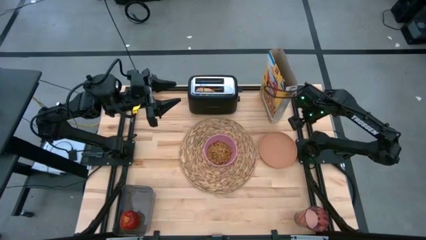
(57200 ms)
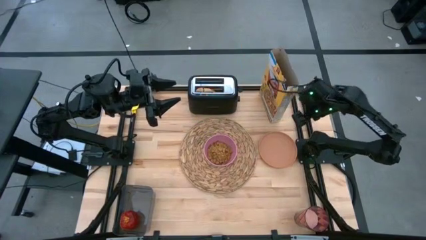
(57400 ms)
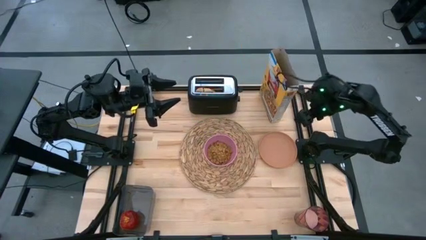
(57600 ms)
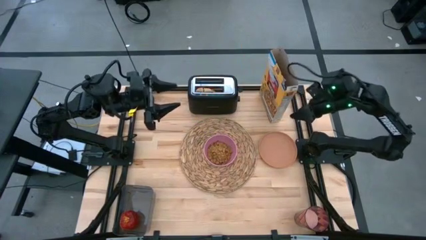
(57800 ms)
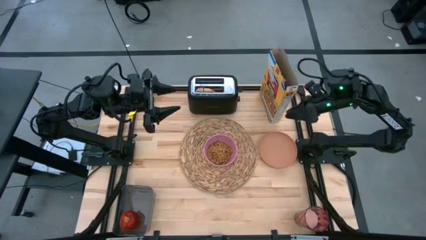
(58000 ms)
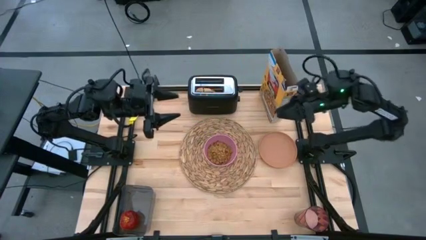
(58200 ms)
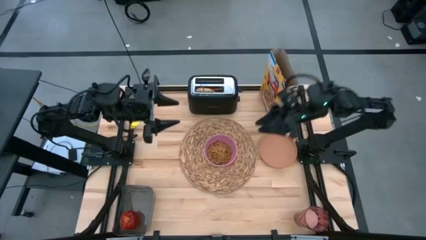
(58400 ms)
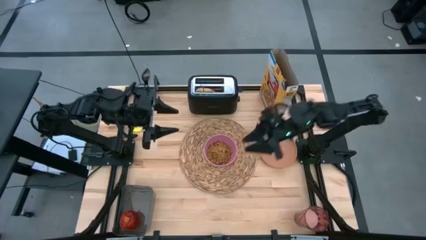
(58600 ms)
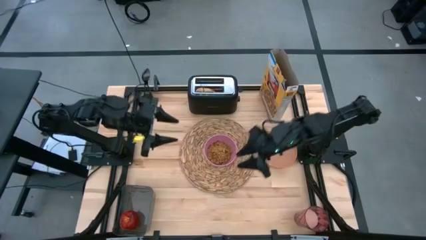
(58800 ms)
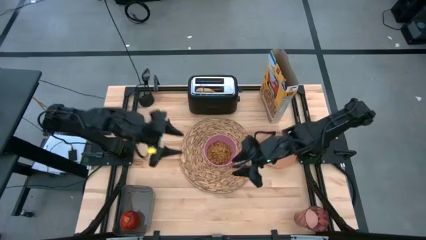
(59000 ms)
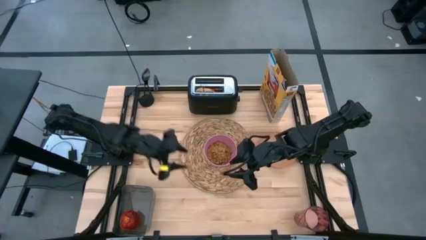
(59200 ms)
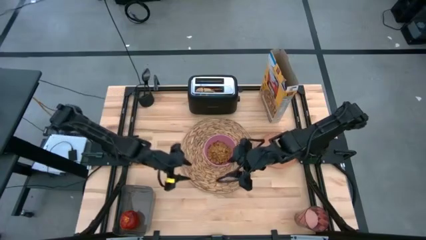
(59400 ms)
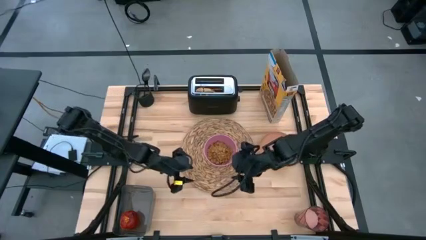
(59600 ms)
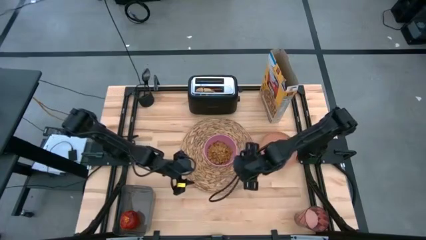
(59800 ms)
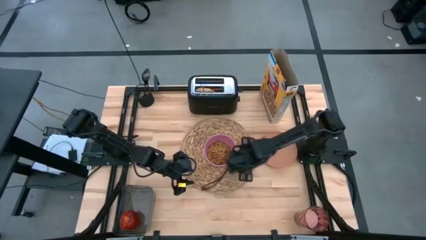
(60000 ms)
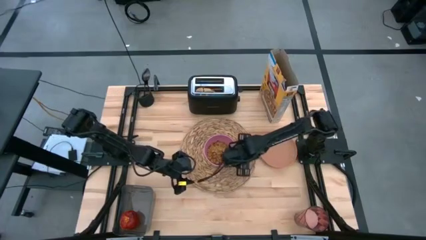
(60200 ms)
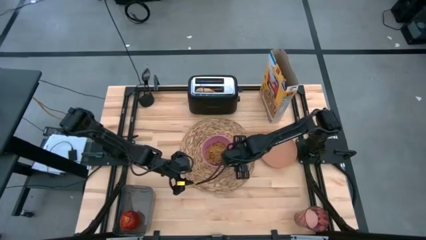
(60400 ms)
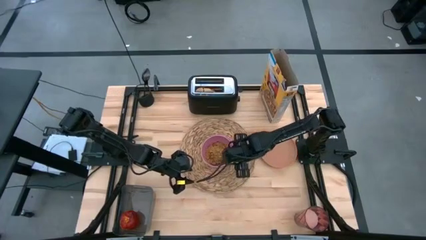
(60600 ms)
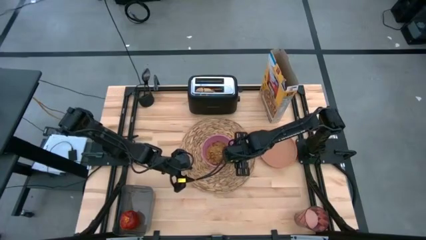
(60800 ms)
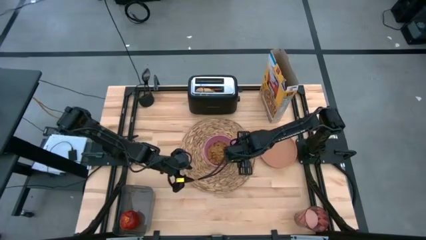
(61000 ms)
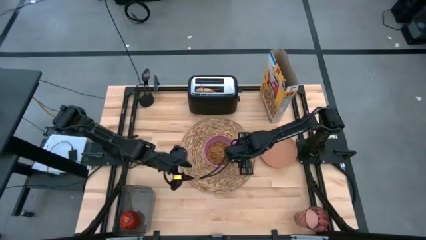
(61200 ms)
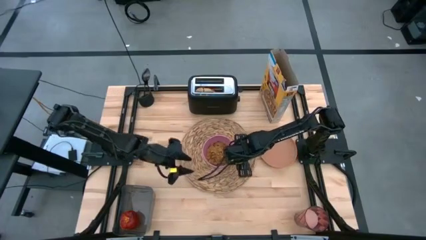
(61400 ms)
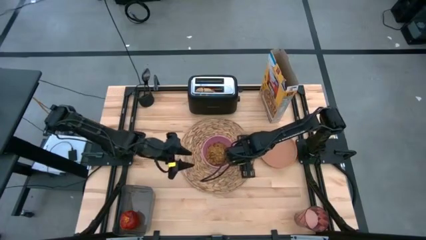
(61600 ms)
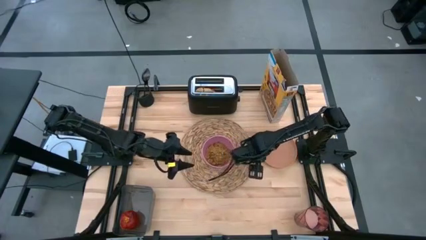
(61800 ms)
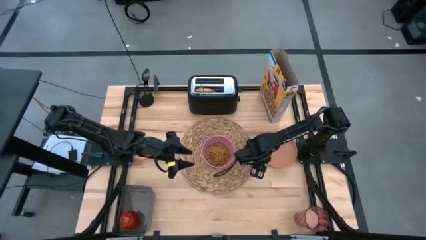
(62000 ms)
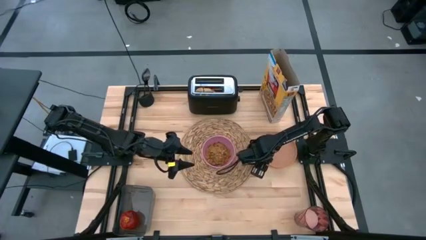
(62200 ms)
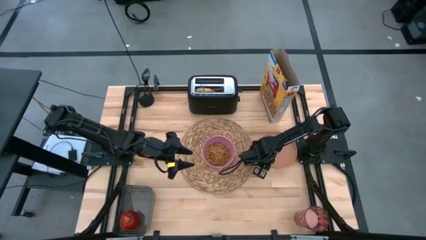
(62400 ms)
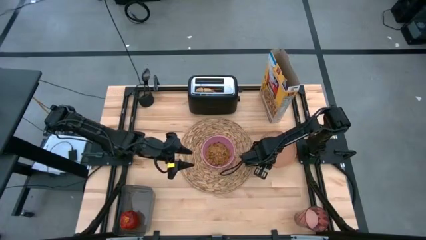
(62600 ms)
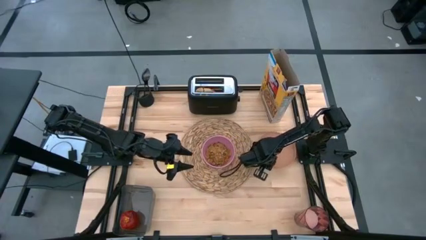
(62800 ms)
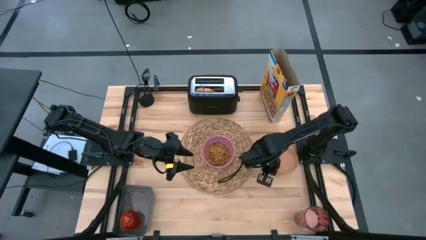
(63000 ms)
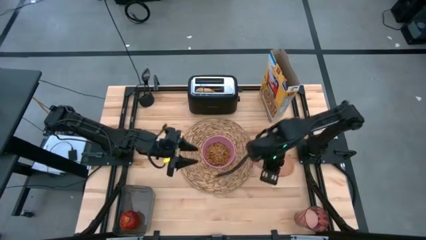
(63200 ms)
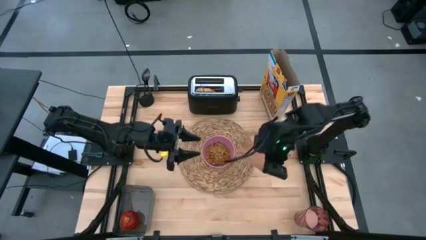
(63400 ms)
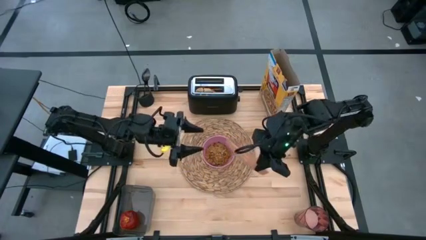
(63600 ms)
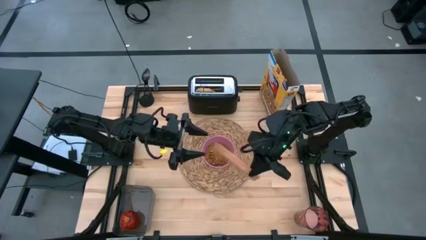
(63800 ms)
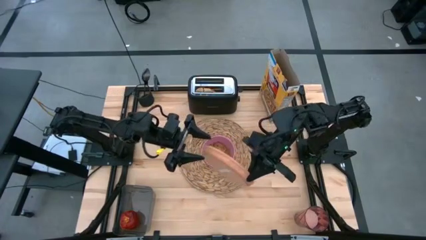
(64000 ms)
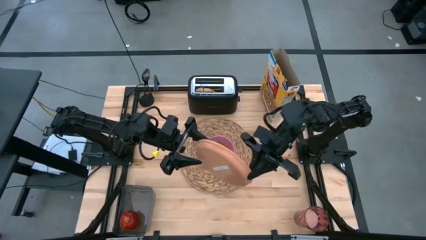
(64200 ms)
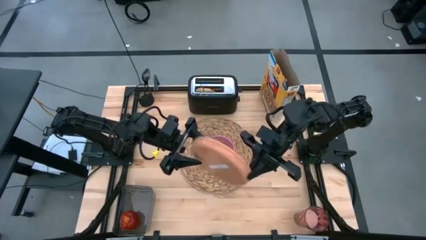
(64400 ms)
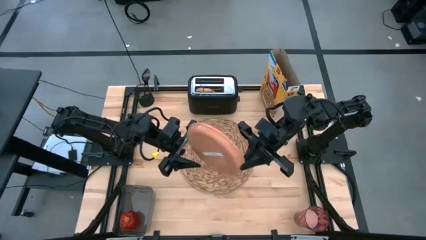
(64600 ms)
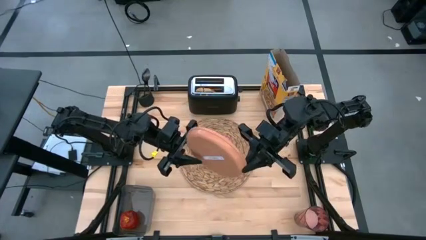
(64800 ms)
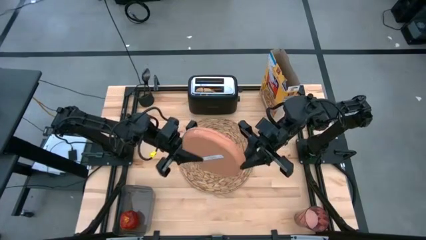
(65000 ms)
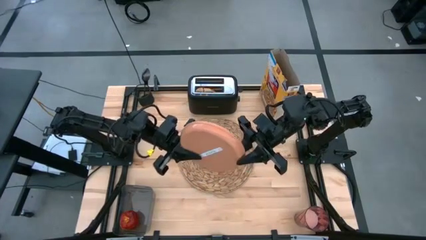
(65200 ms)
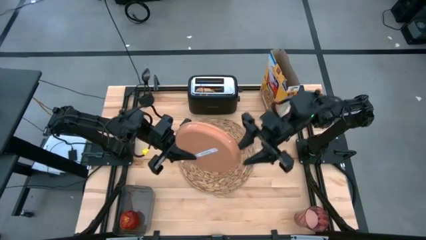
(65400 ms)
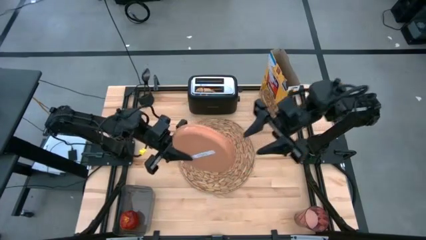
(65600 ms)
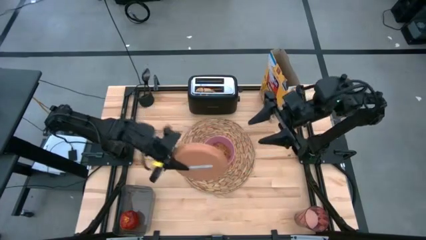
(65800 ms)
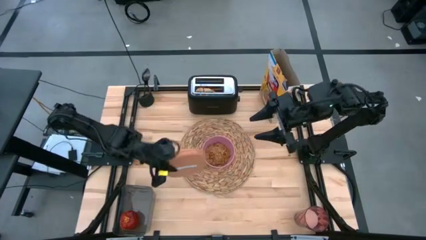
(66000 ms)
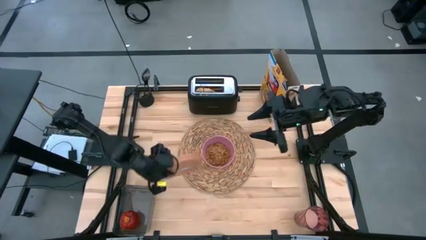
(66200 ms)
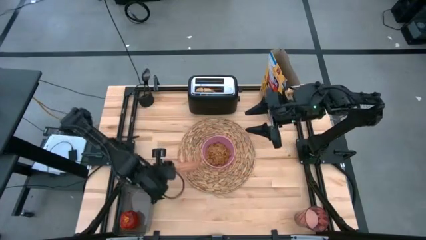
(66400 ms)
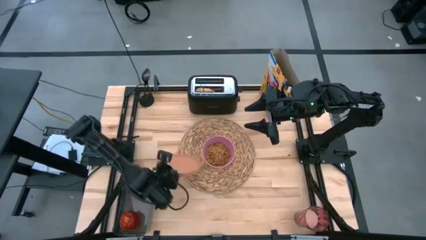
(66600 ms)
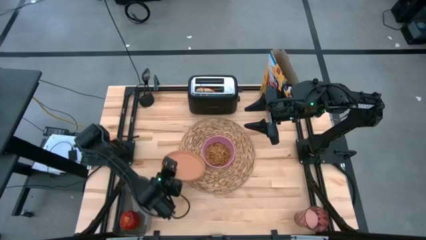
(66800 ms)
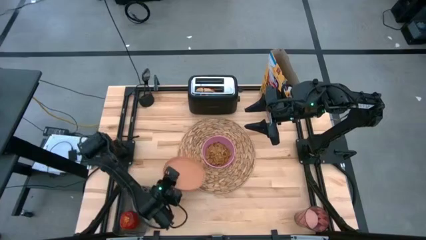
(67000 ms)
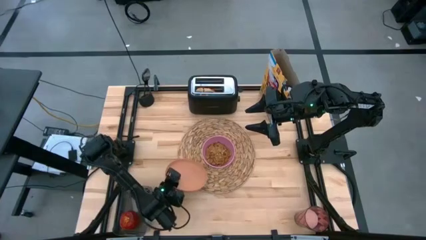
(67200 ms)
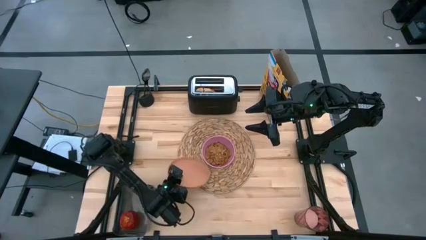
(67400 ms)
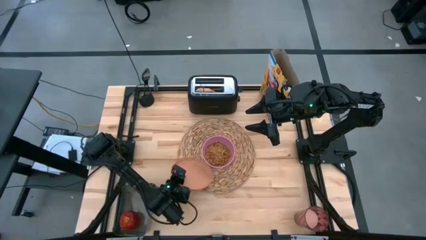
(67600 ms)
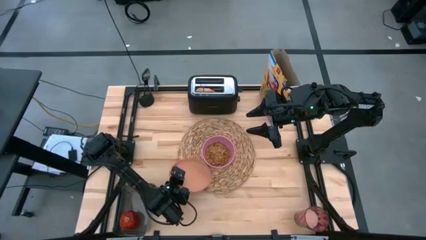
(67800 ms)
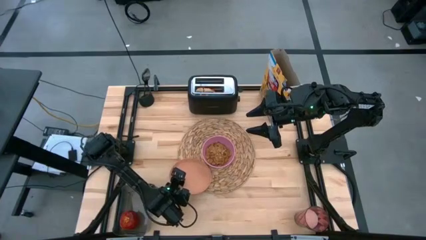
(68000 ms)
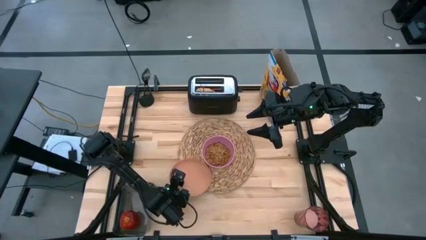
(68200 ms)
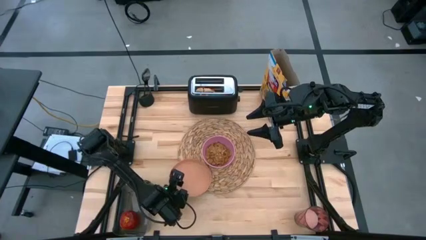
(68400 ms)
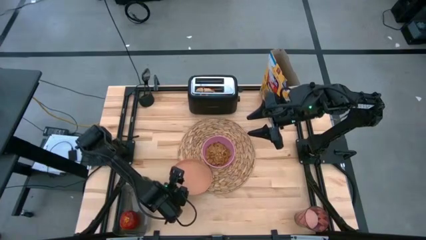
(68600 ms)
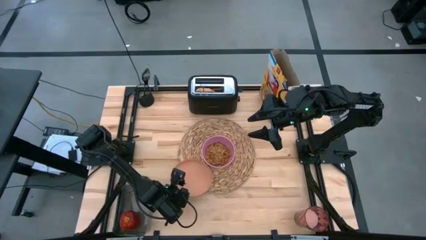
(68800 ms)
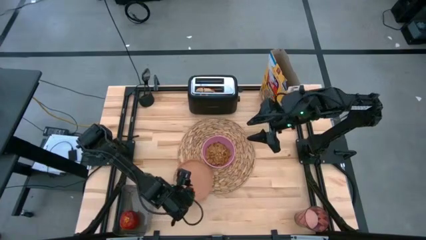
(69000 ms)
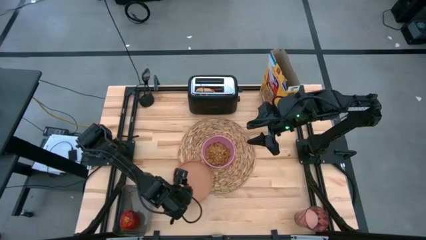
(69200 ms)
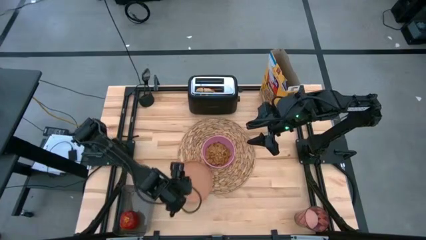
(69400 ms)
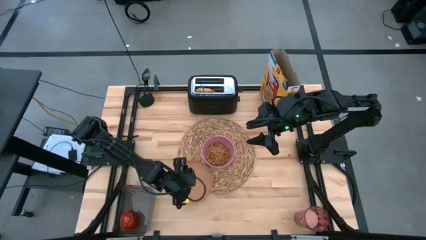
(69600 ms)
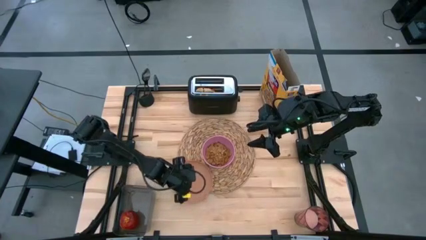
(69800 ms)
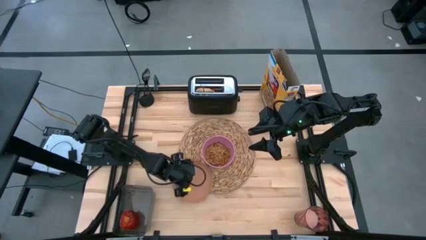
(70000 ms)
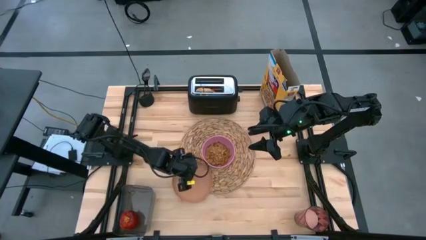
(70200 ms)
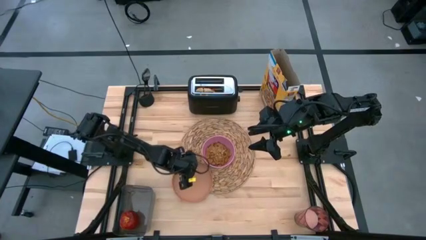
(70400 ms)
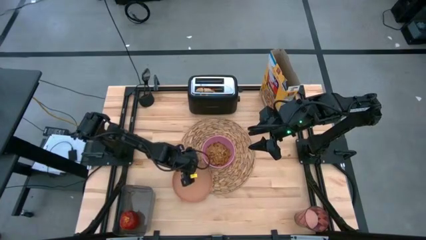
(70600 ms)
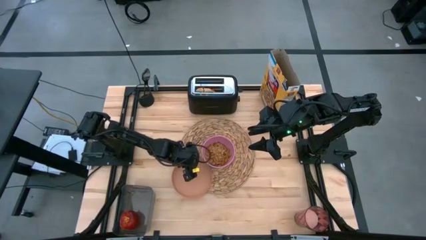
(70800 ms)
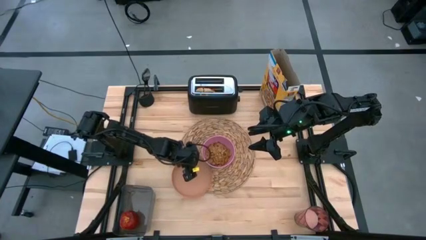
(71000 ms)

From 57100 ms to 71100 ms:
Task: Arrange a breakfast setting
Put the brown plate on the brown placemat

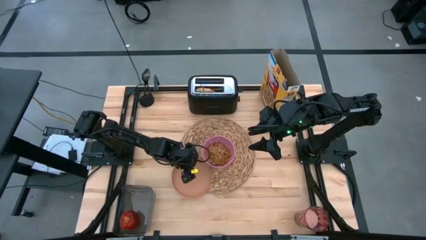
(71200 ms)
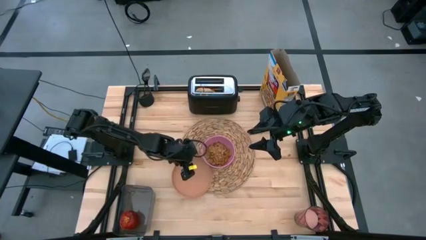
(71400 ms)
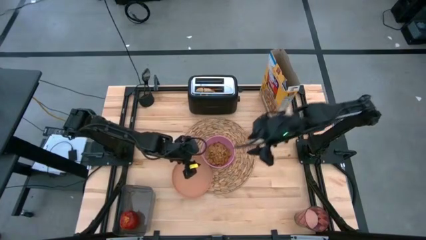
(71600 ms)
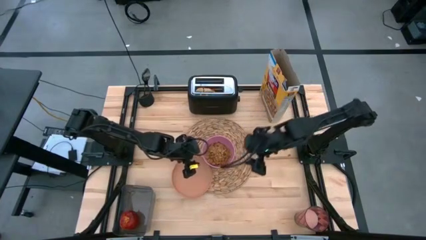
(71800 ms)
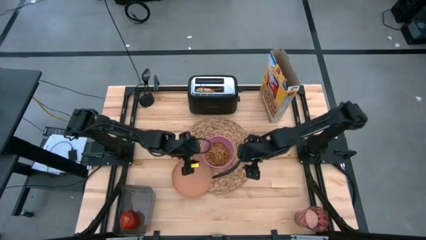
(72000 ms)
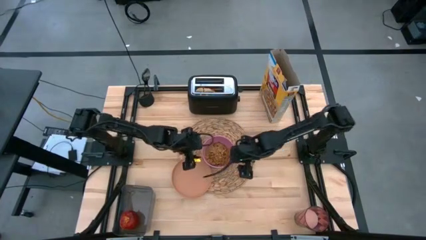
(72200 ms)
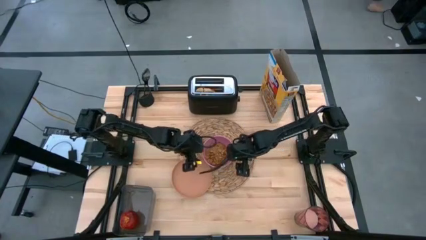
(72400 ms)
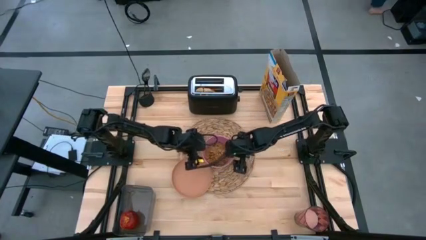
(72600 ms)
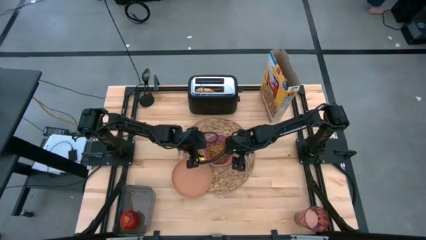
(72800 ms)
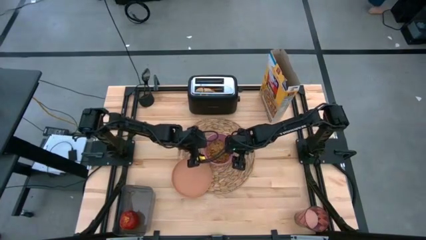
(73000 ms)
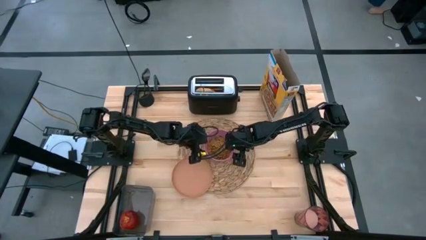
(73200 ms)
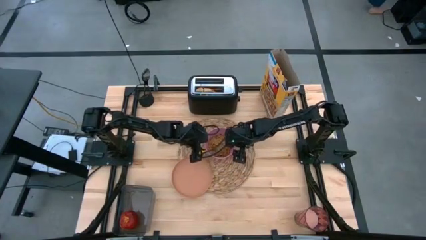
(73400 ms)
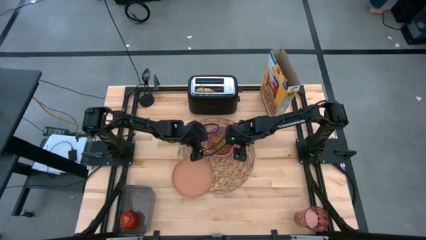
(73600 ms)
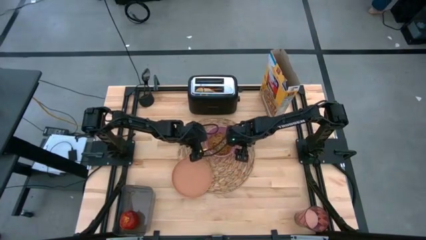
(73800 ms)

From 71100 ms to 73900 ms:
Adjust the pink bowl on the brown placemat

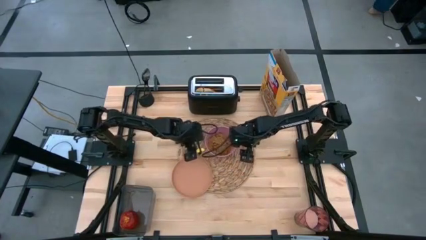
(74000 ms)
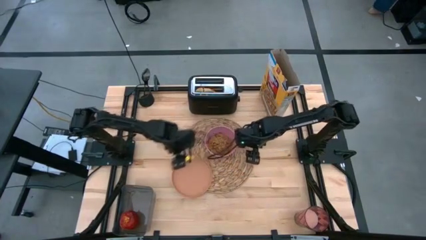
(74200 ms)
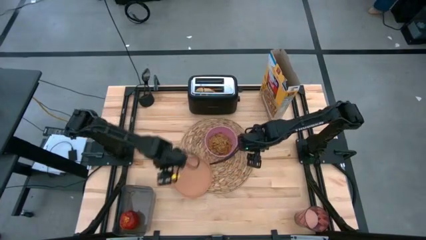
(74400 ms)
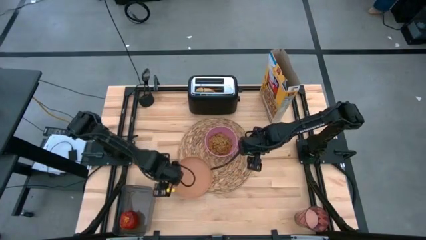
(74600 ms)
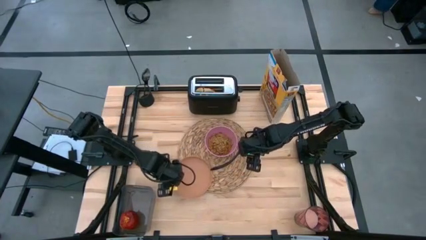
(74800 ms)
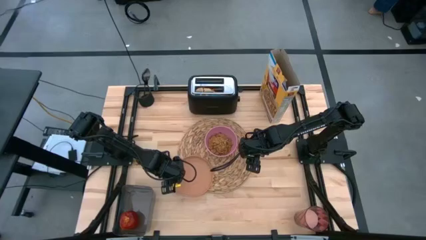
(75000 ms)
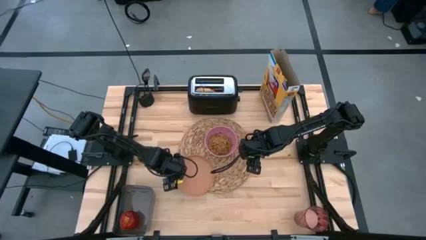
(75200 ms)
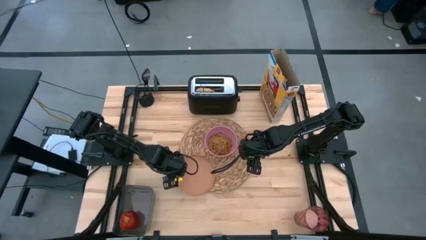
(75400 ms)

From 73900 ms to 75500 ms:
Adjust the brown plate on the brown placemat
